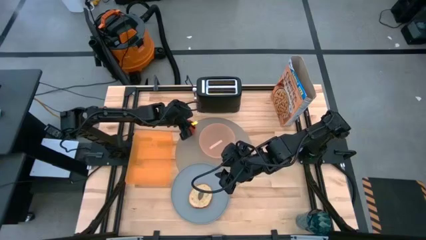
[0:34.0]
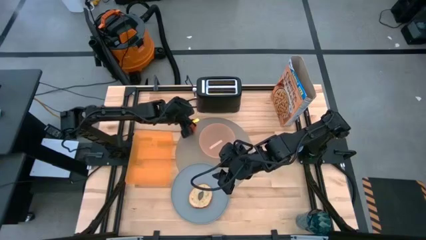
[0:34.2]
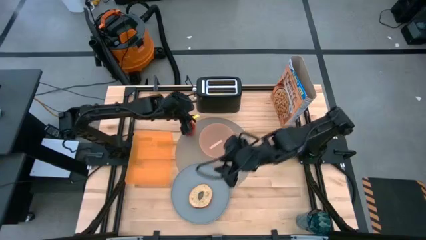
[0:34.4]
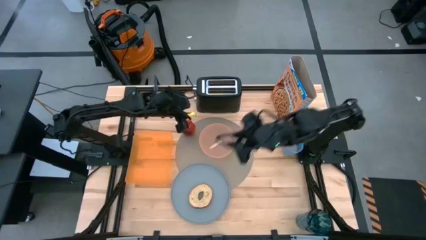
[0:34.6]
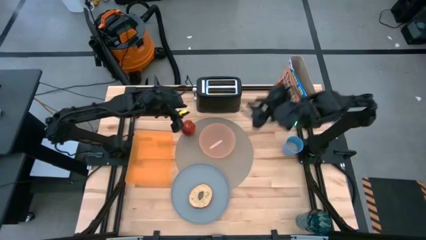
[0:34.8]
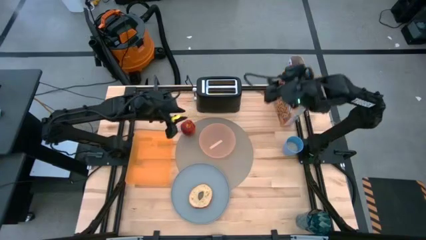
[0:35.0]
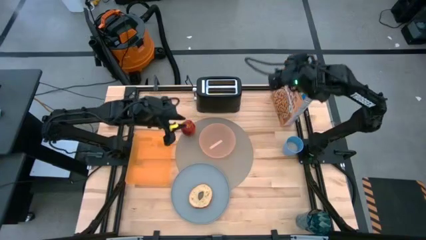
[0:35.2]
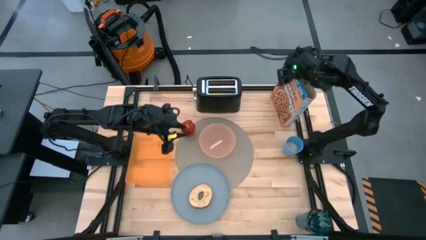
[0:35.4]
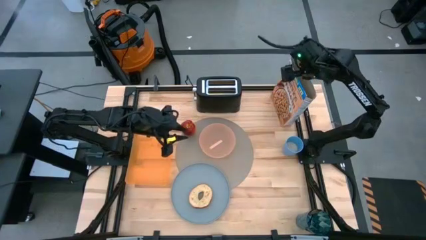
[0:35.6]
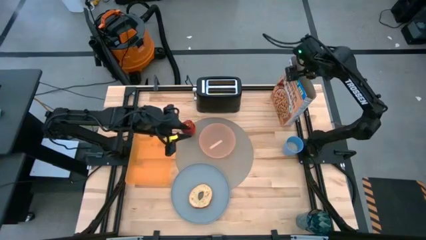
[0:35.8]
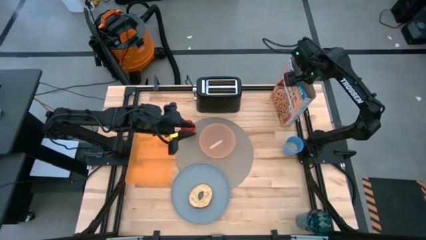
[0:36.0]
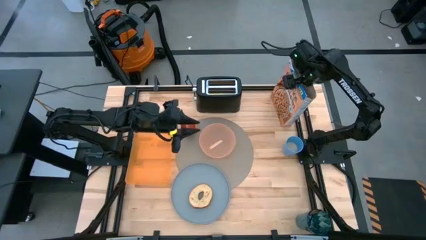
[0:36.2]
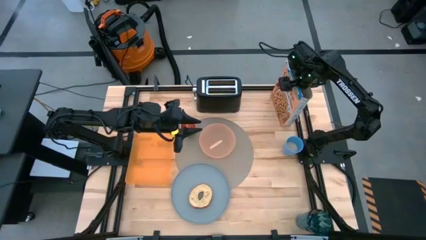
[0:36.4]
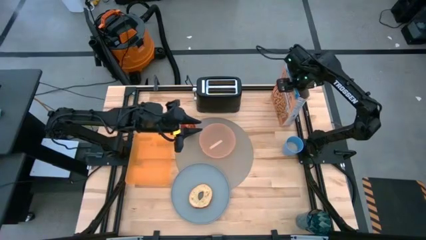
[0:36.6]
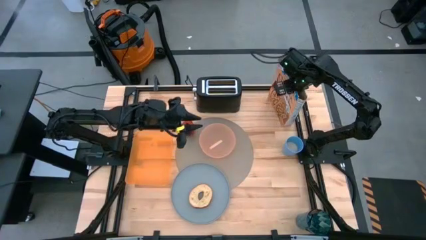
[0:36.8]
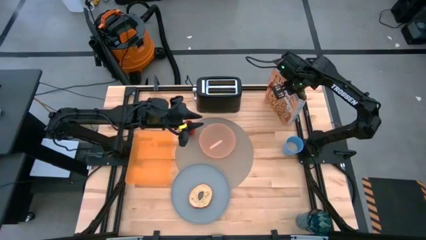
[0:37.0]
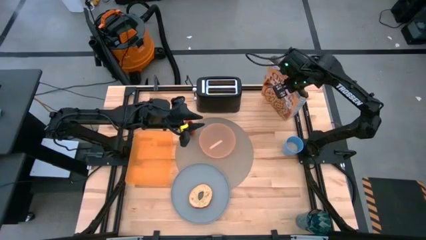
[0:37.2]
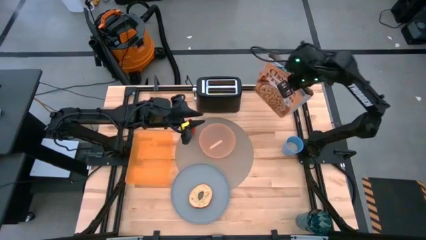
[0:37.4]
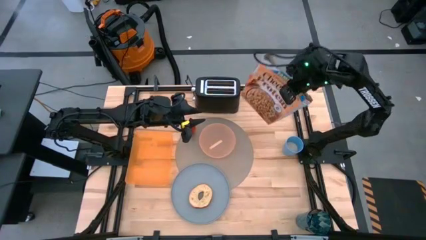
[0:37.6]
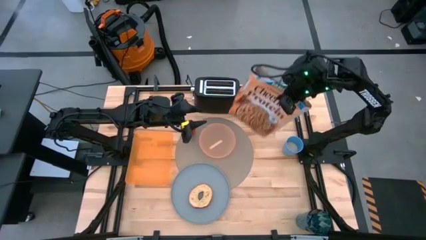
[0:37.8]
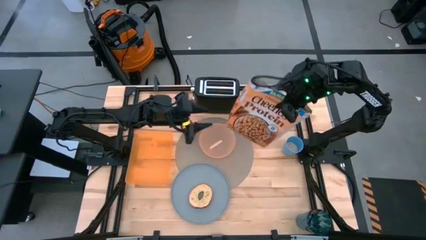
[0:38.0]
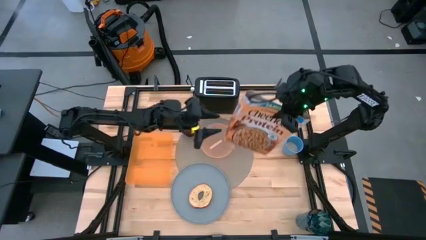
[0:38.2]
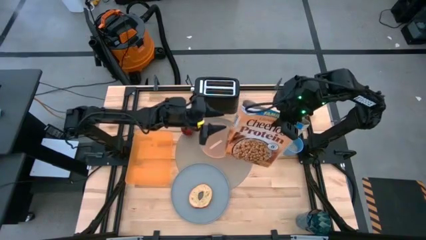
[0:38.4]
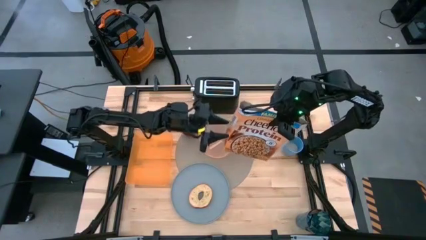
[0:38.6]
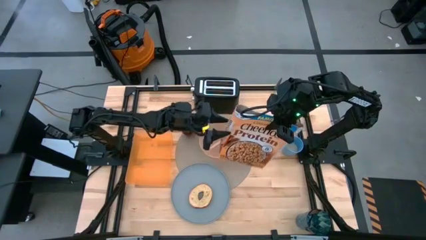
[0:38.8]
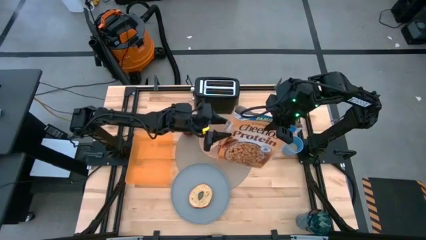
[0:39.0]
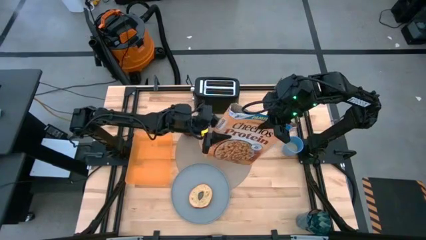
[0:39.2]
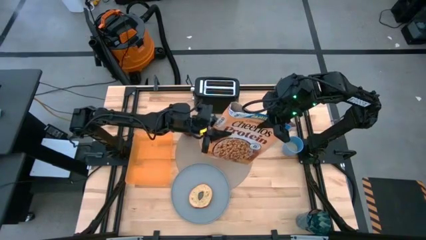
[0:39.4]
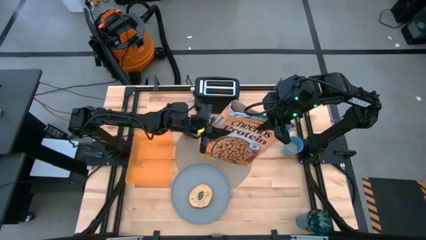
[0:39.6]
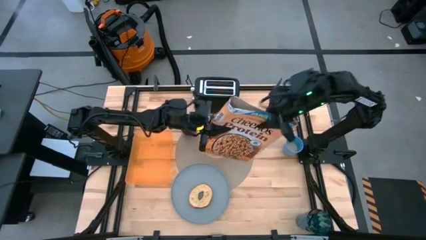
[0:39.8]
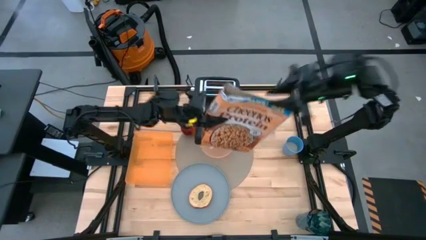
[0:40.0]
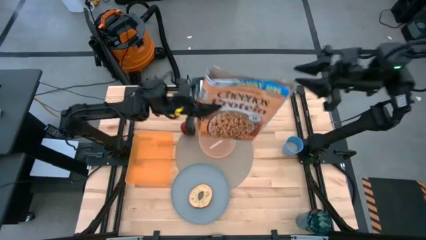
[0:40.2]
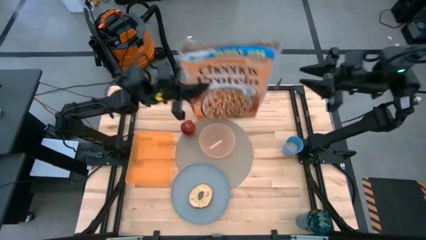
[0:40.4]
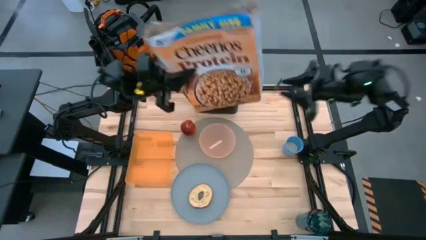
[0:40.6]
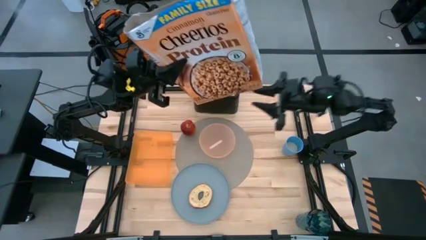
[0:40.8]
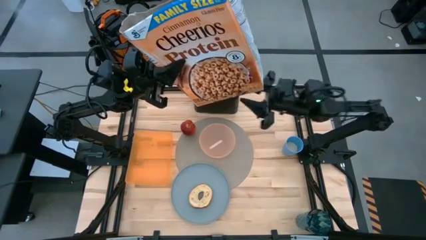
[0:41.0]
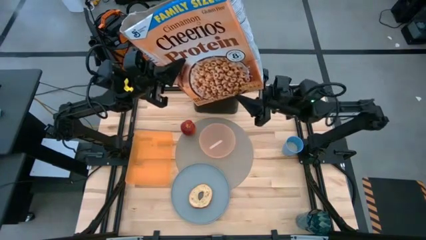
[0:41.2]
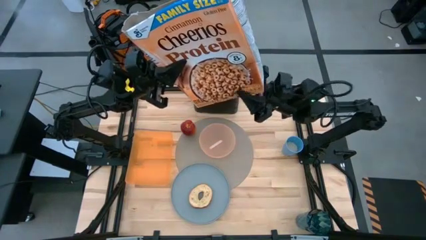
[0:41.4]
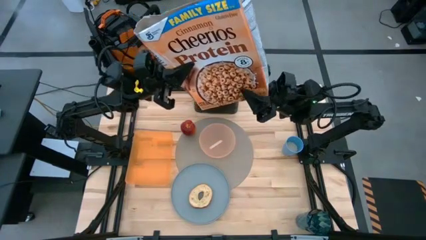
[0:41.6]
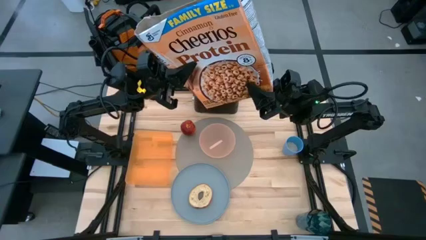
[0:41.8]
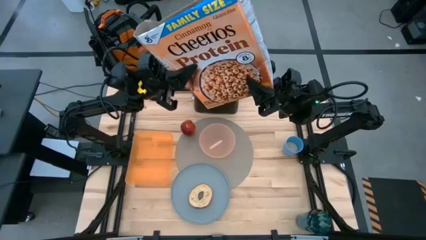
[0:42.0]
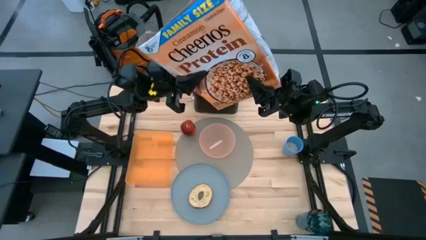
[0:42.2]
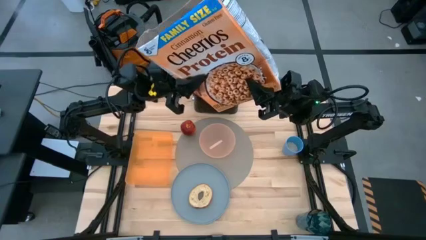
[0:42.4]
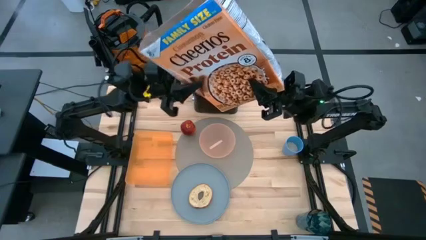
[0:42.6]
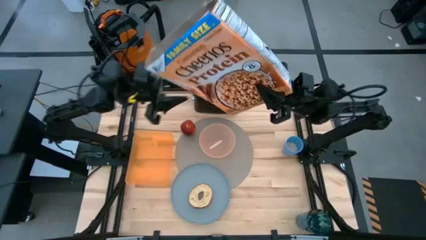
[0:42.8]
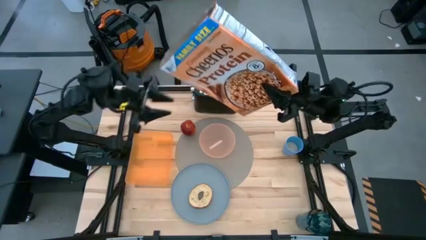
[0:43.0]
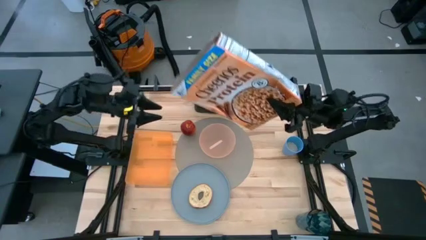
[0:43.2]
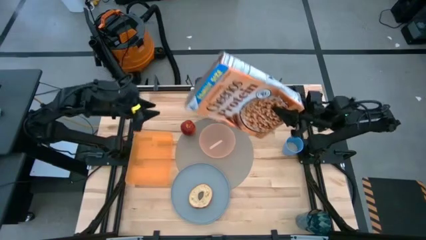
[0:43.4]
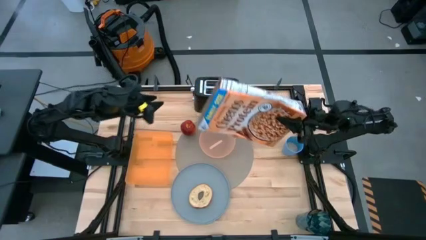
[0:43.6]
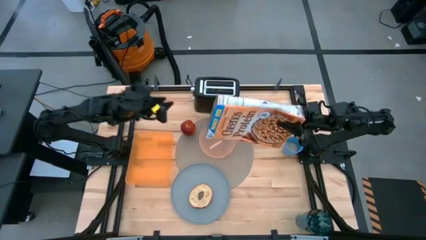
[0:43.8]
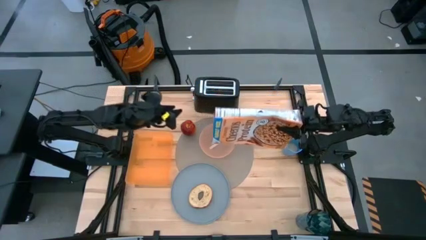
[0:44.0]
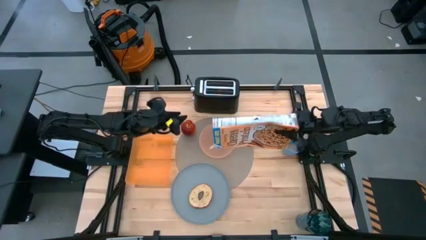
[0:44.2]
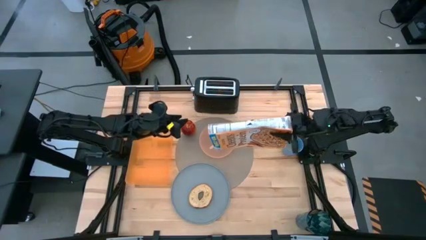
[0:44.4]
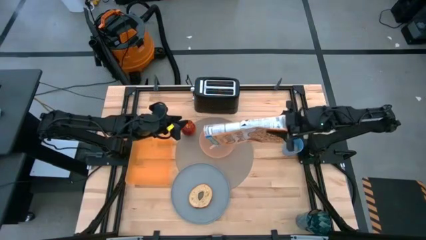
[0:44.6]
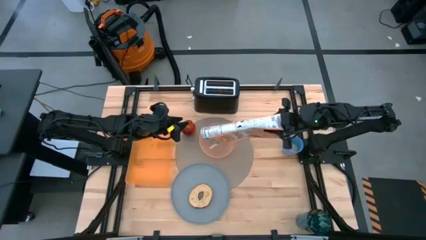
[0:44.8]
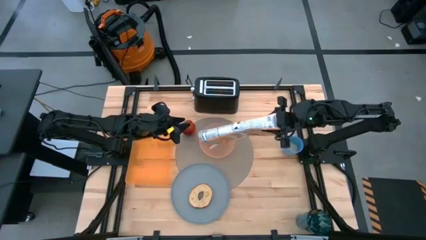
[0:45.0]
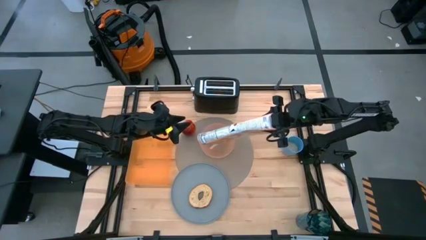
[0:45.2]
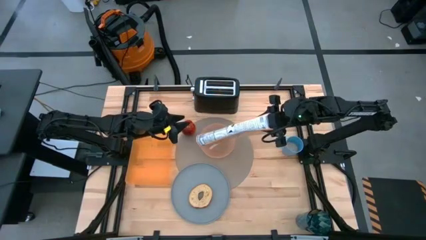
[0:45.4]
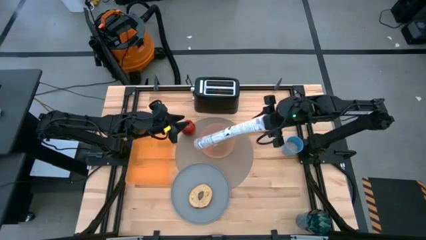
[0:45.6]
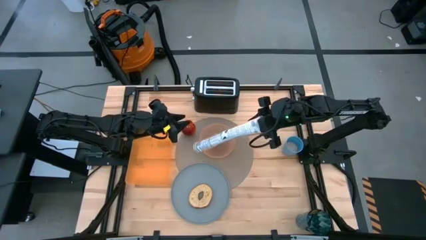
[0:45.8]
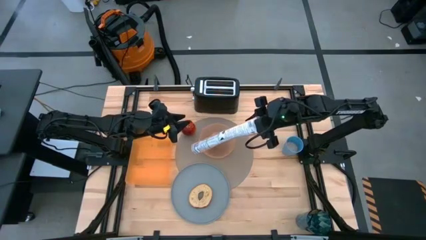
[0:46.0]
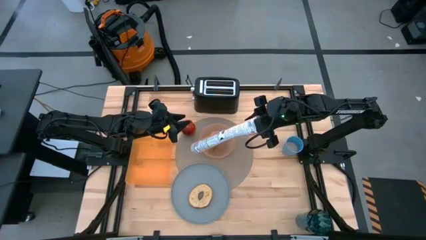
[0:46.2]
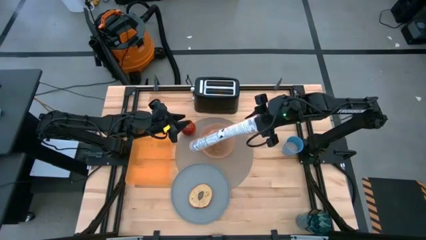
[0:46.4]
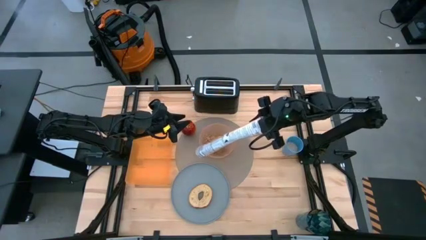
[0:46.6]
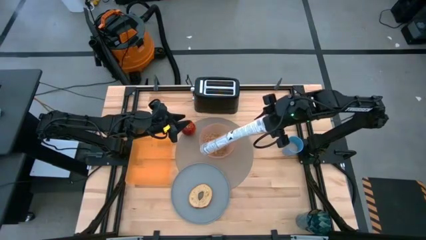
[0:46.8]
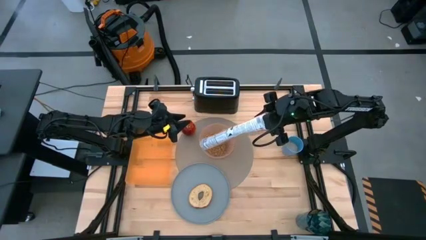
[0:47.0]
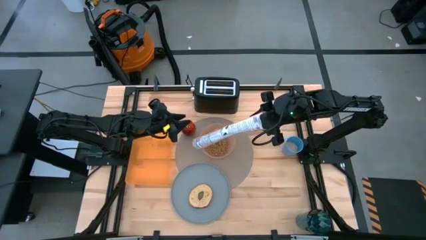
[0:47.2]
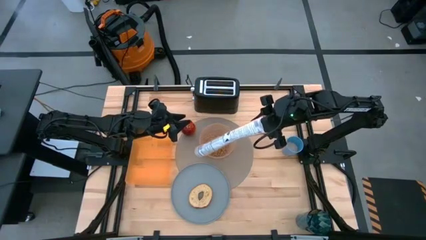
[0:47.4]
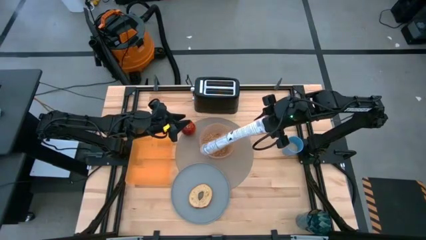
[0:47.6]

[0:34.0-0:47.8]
Task: Arrange a breakfast setting
Pour the cereal into the peach bowl
